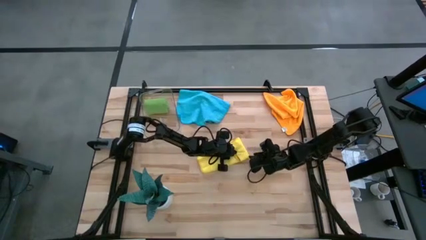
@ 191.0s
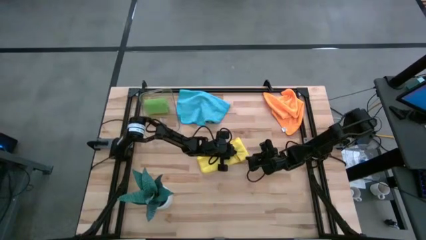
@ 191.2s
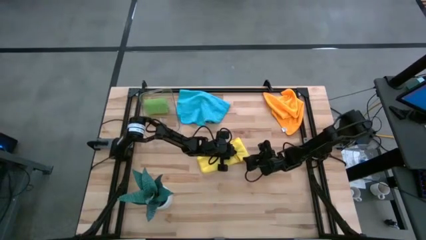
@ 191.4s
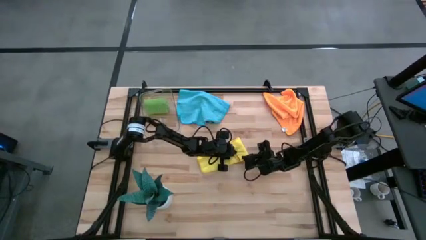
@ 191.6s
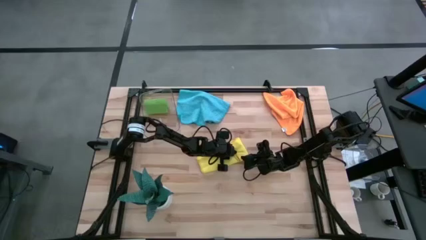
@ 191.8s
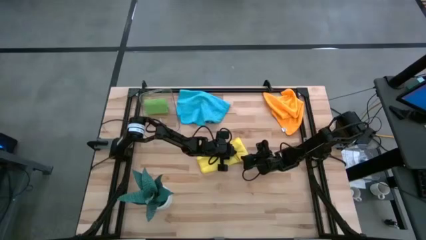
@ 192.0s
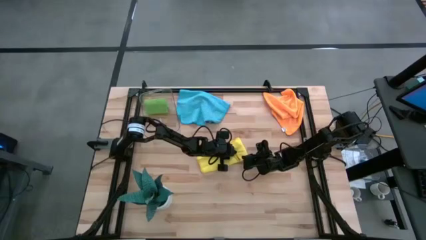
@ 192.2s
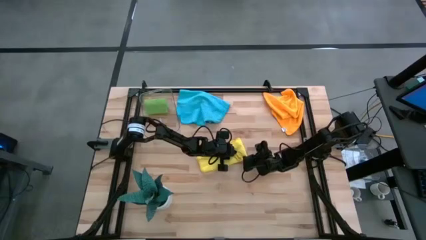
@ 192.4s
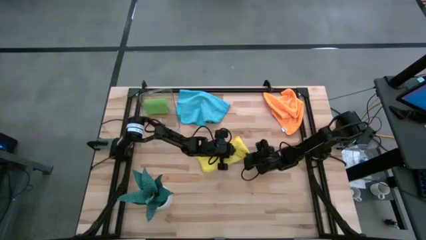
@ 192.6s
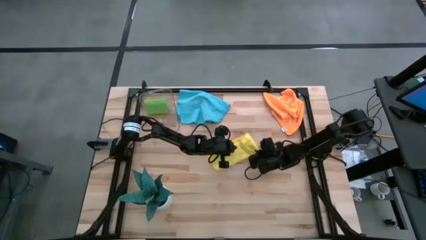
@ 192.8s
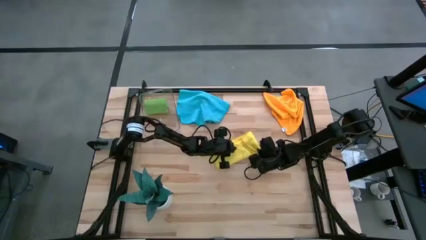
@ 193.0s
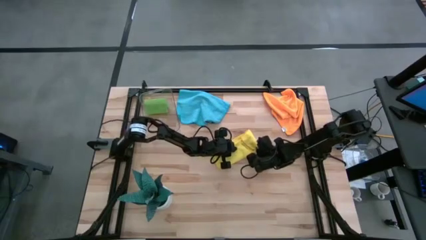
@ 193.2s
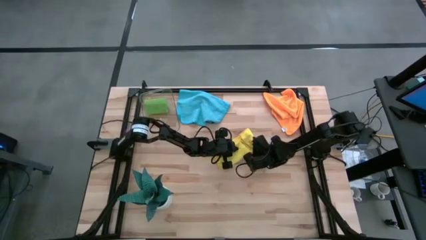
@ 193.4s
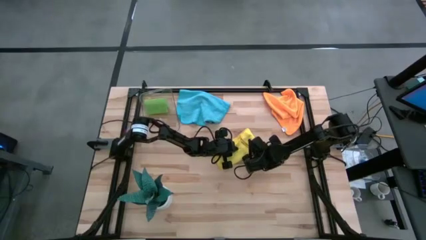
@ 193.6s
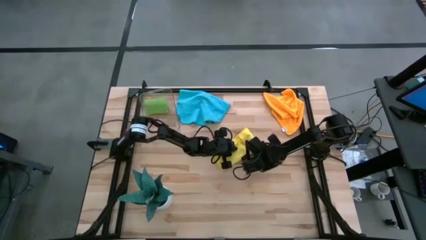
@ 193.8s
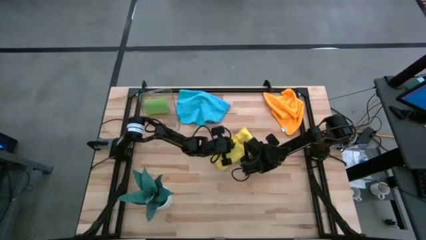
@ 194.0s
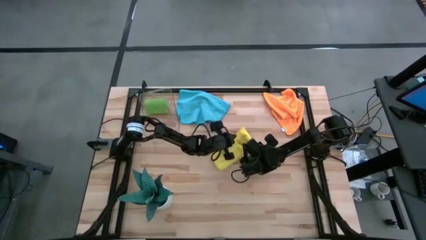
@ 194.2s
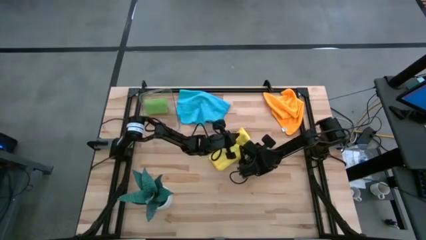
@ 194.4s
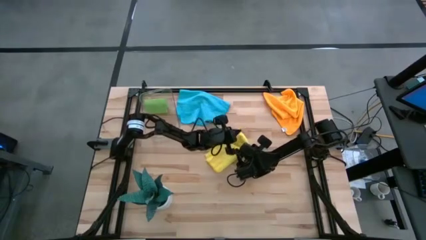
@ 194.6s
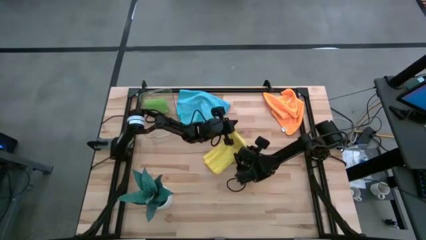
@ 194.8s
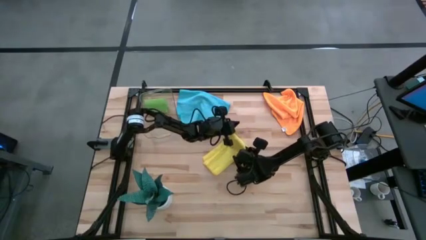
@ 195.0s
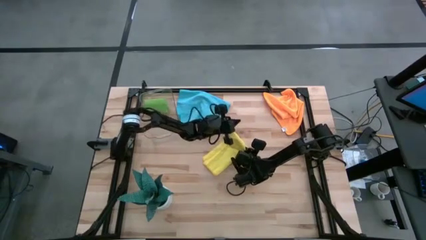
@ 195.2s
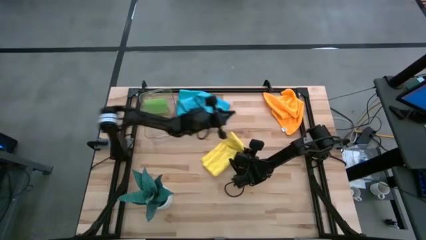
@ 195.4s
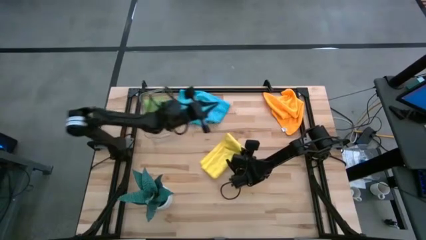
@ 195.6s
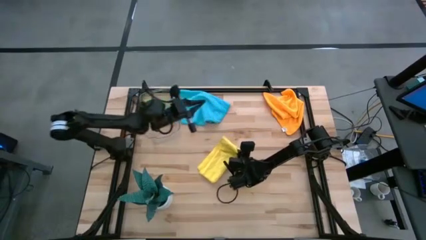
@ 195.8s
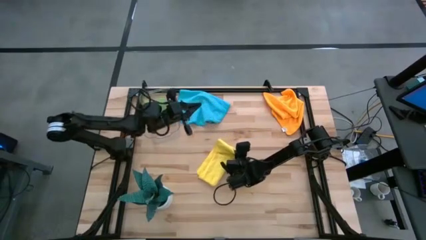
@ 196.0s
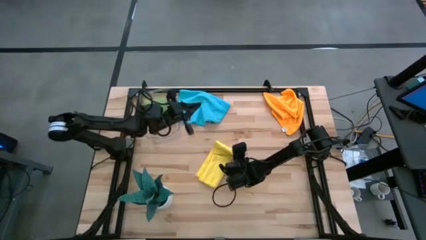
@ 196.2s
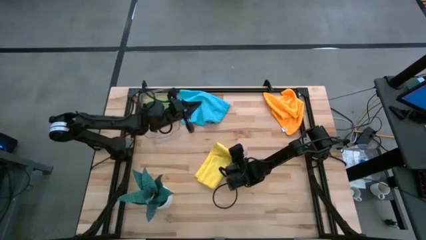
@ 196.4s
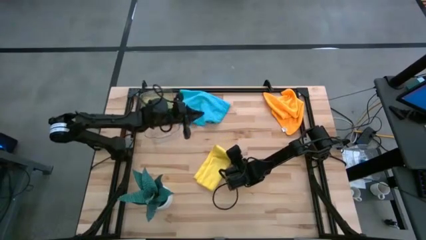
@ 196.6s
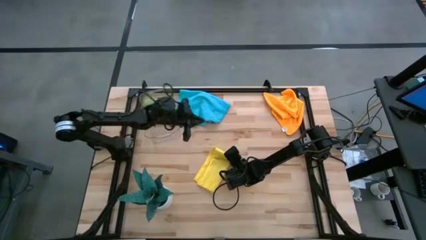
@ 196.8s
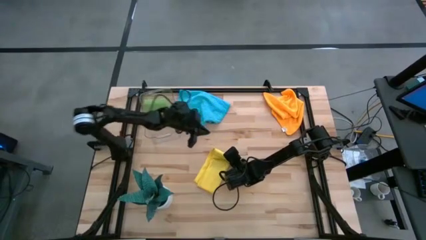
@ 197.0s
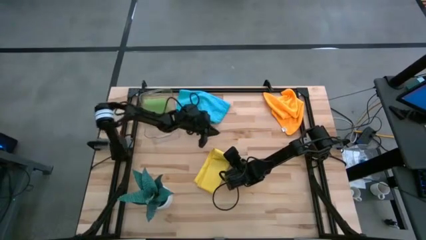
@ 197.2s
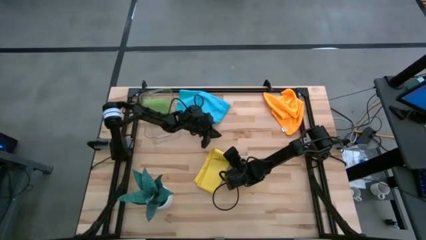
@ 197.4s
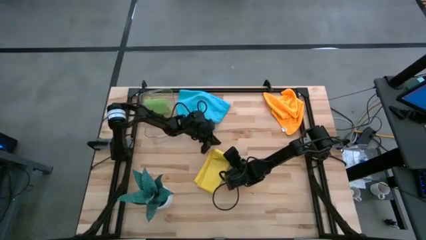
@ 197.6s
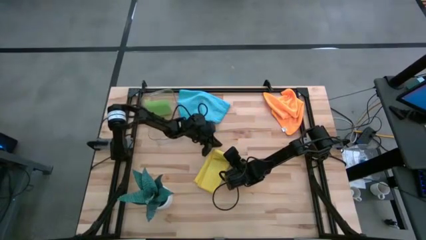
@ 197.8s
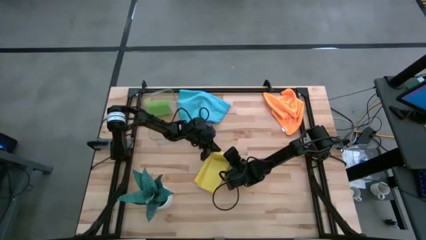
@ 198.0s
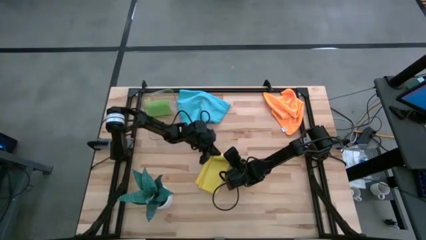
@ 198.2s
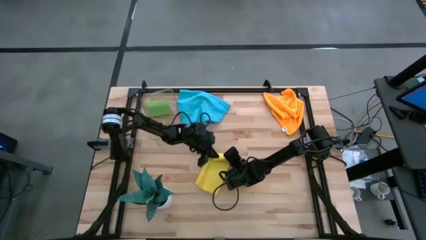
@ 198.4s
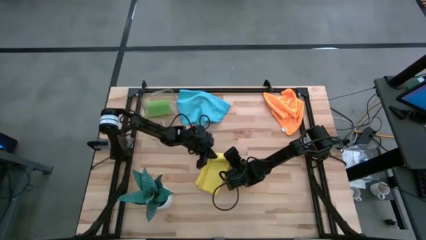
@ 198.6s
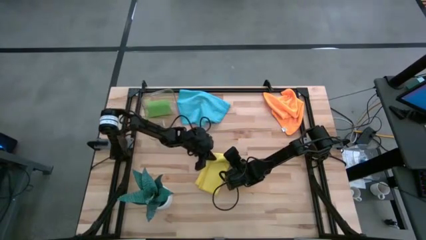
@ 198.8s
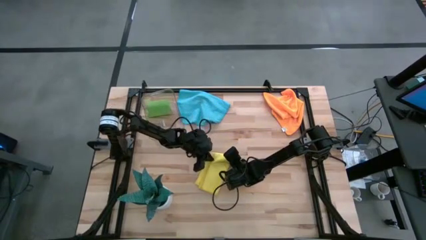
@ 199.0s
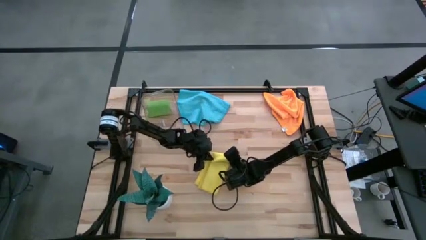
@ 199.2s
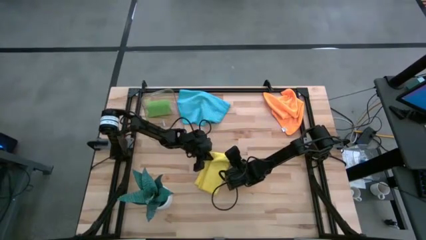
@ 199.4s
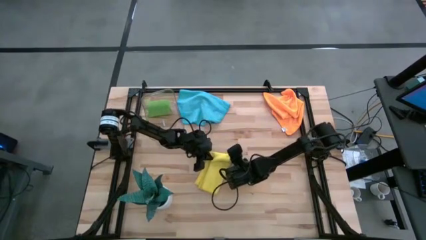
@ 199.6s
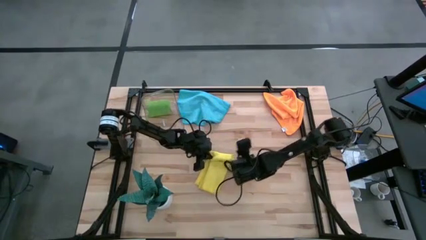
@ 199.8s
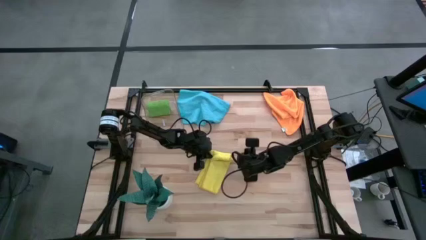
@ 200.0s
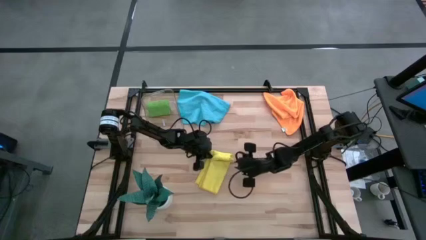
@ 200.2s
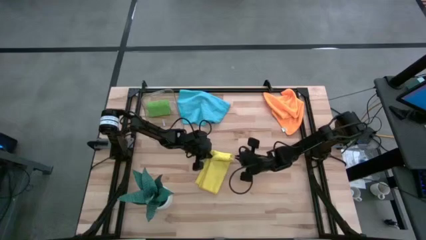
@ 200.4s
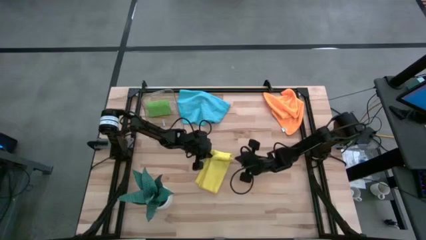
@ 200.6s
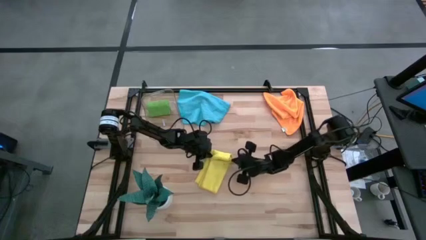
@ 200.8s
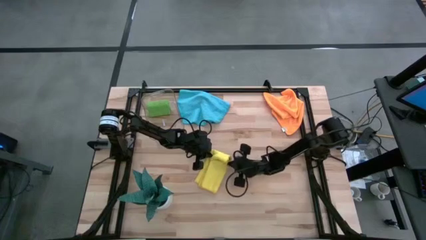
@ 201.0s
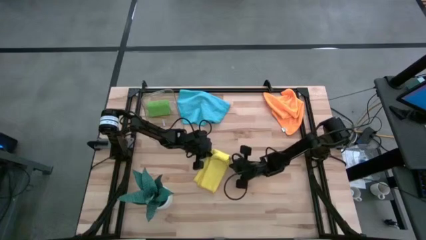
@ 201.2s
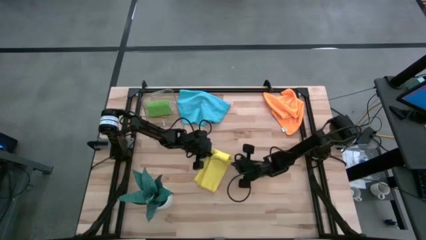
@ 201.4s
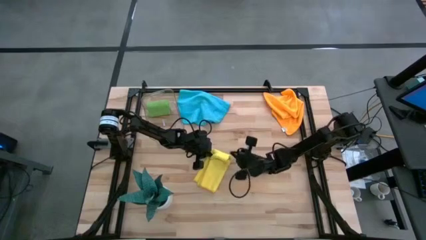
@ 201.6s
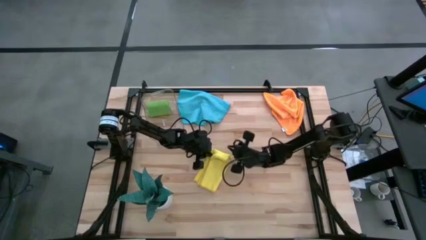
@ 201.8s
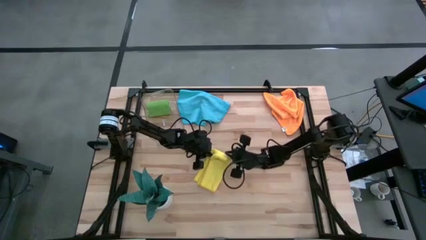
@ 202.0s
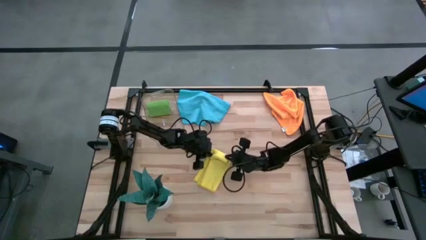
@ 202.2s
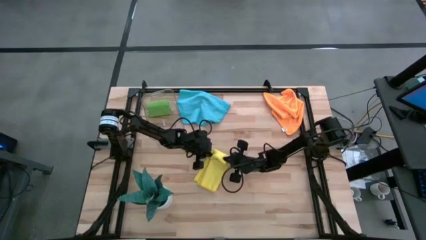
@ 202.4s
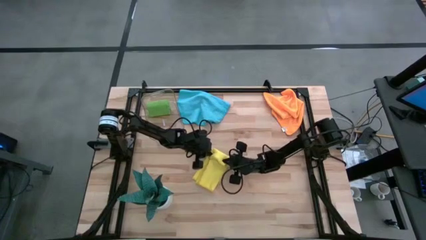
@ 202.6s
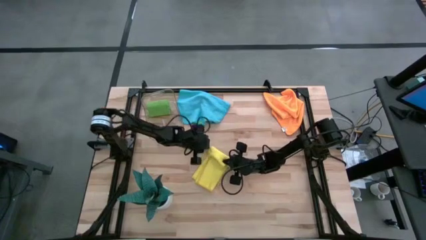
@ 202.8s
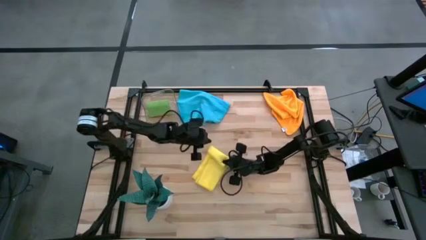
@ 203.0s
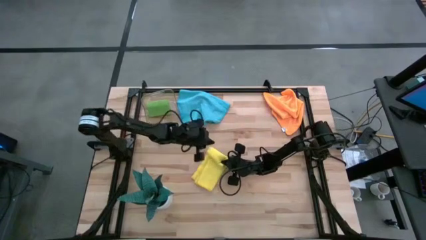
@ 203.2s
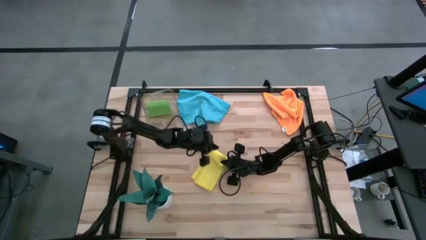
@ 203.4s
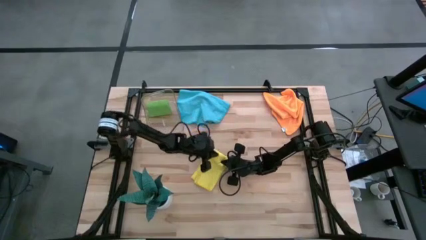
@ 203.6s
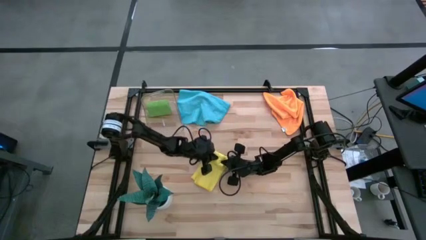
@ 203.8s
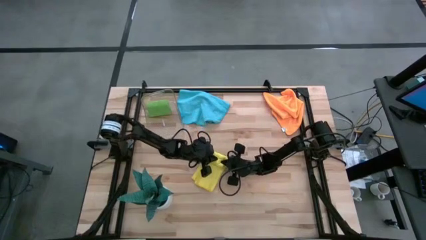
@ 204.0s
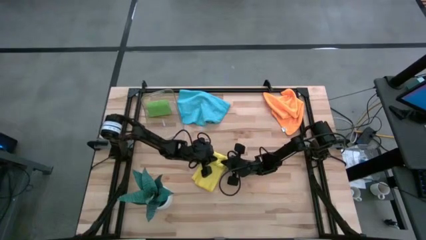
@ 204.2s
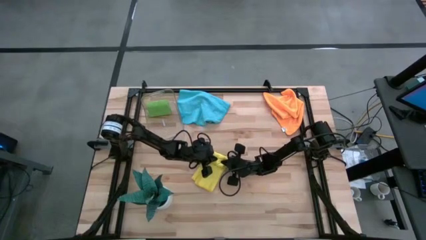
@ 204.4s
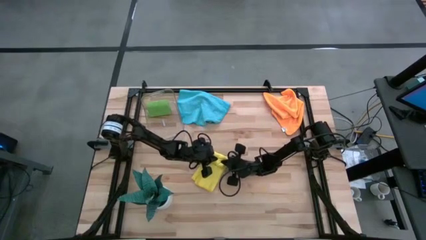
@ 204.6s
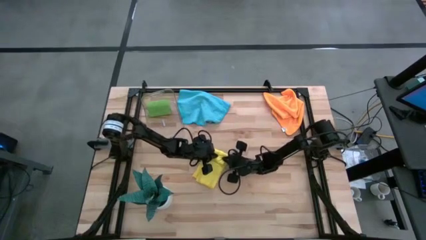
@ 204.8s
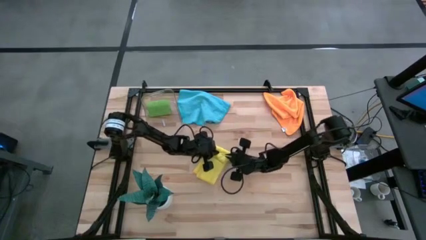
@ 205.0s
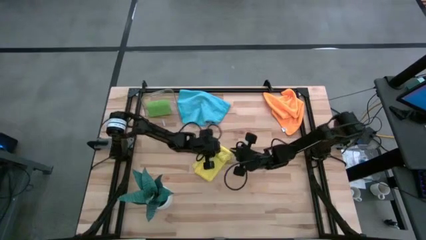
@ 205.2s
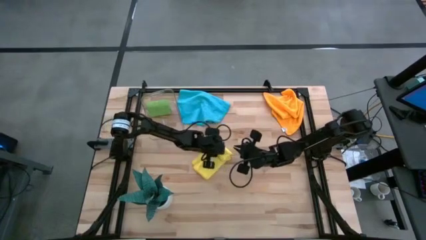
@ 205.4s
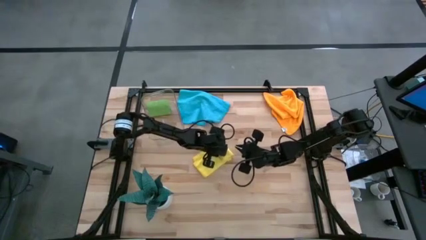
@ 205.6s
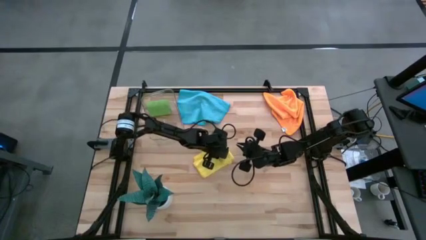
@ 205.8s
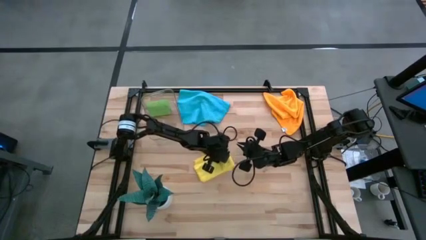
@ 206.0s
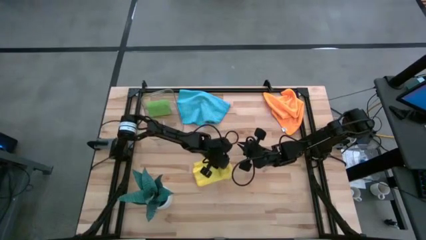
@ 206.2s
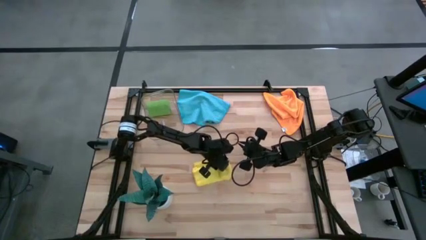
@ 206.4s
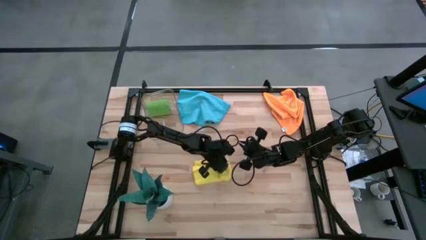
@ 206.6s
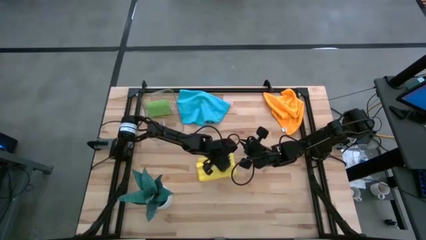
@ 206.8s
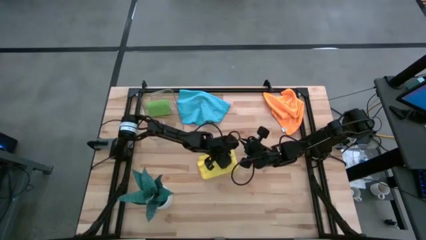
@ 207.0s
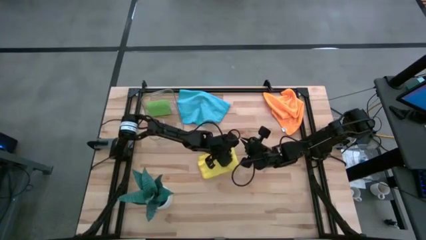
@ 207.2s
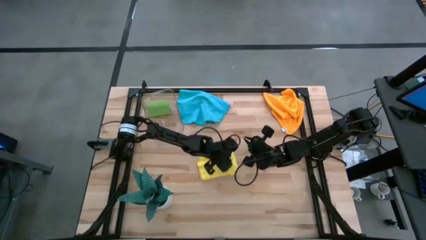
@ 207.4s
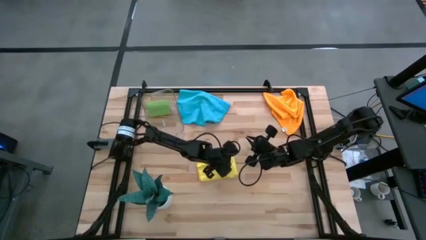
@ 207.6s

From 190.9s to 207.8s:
Task: Roll microfiber towels into tight, uniform cylinder then place into a basket
Roll the yellow microfiber towel
